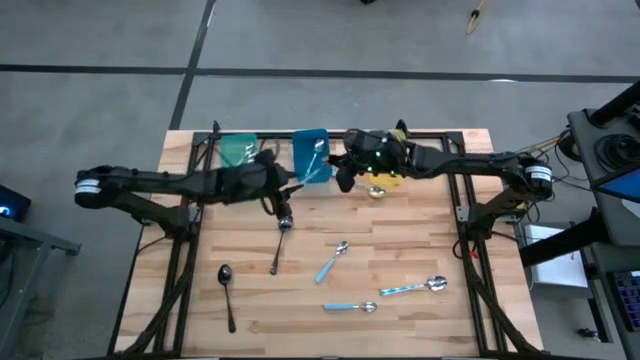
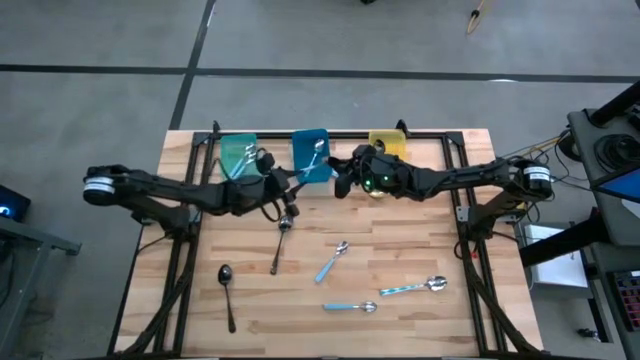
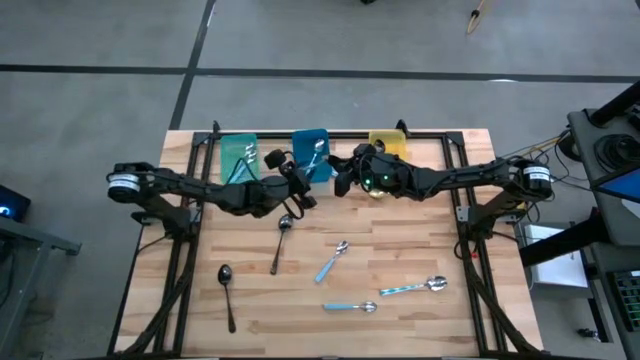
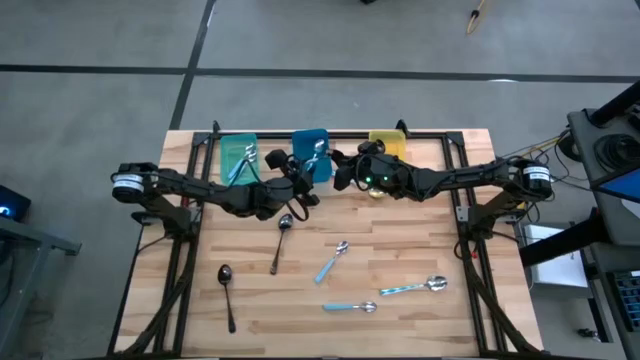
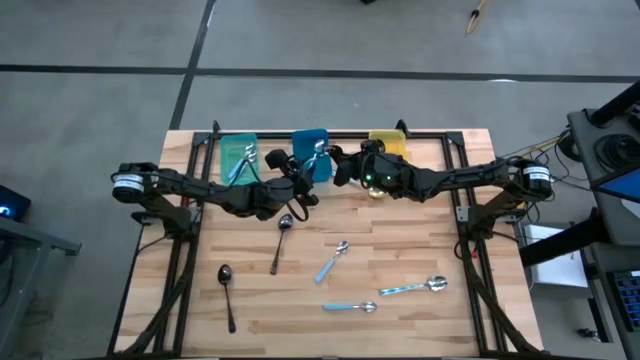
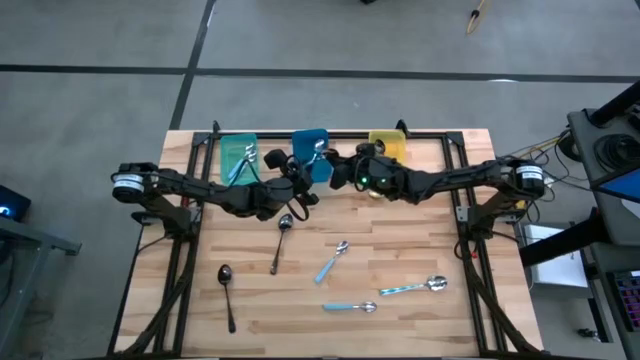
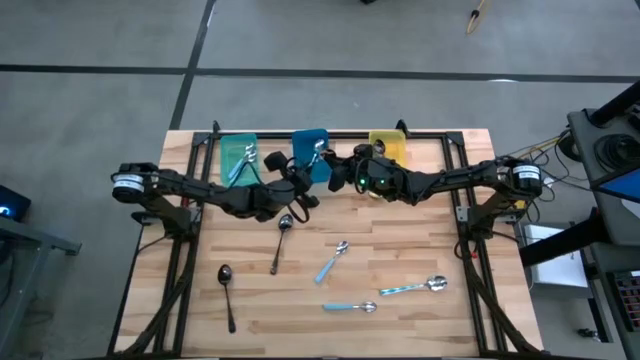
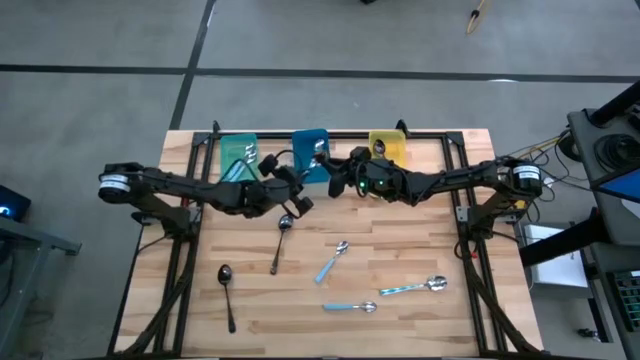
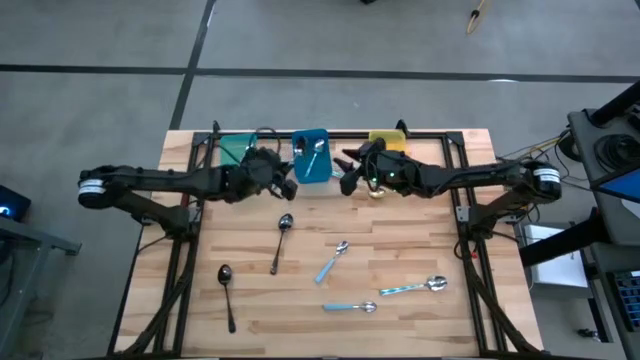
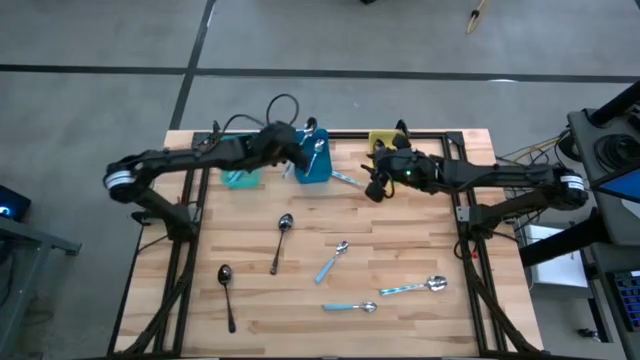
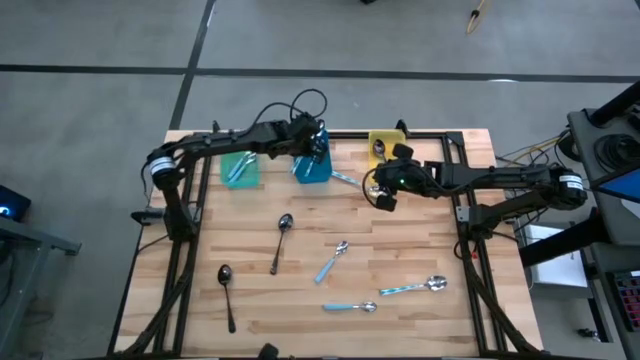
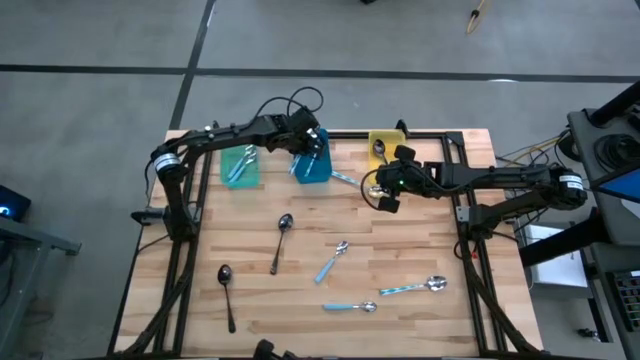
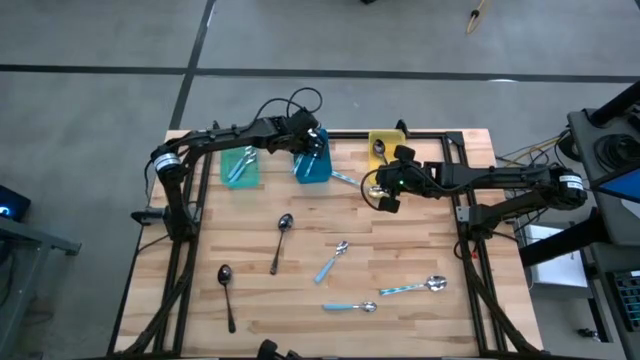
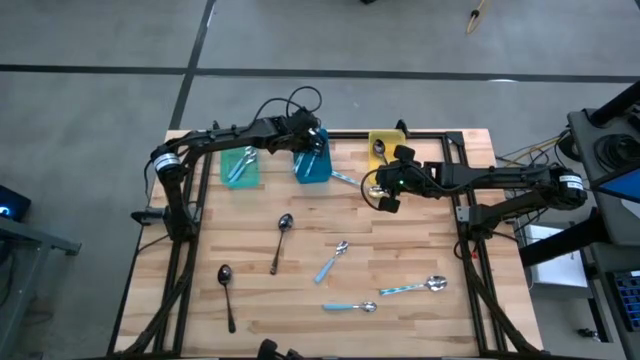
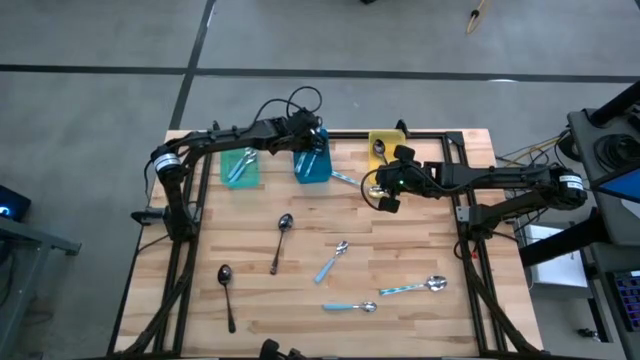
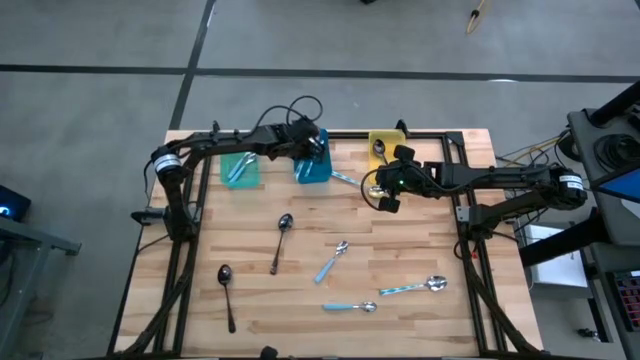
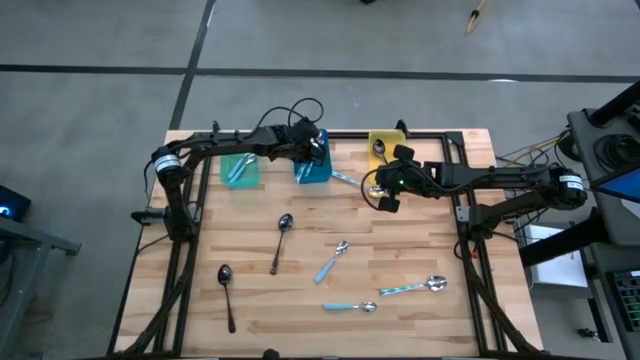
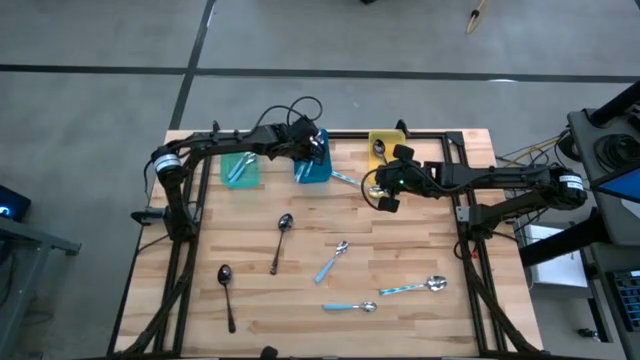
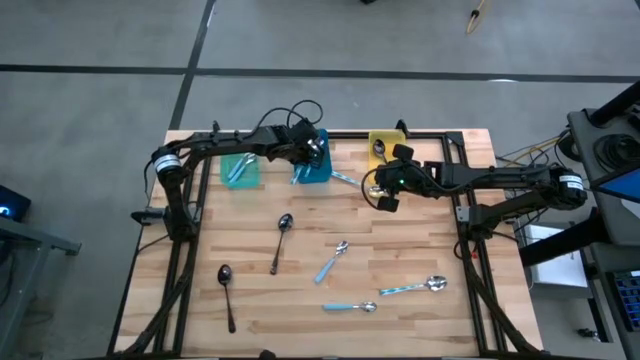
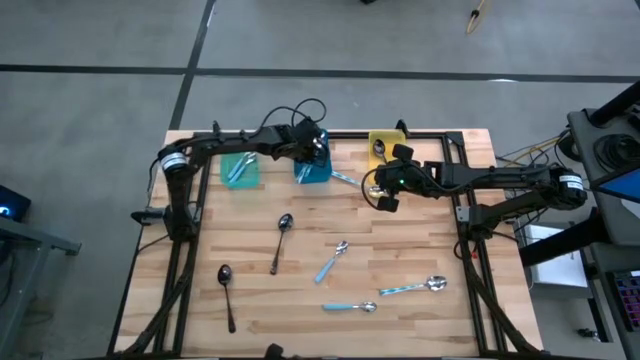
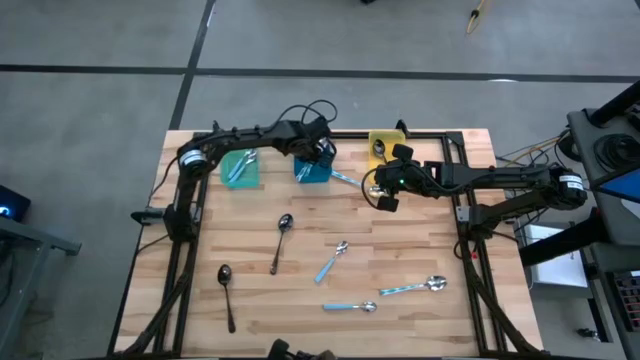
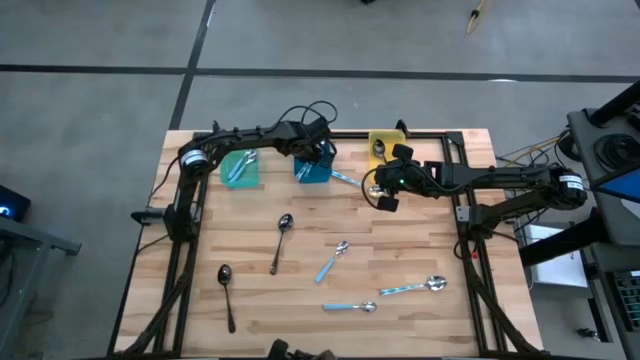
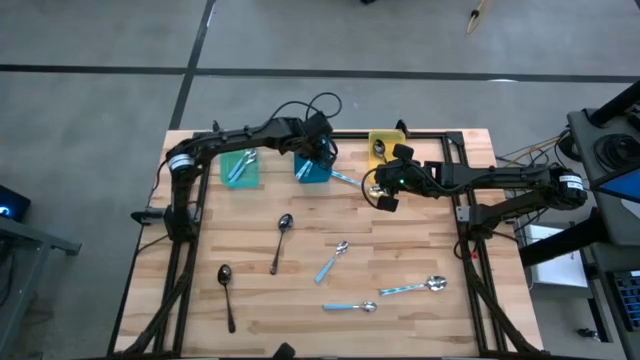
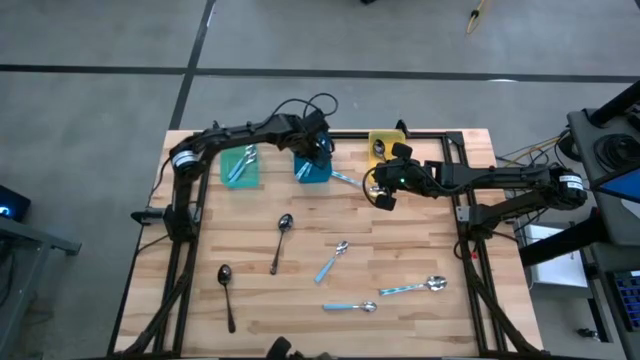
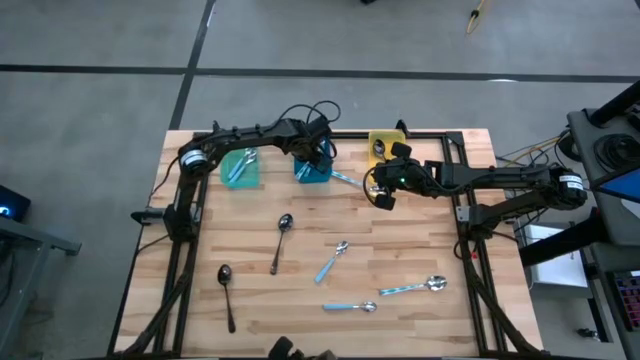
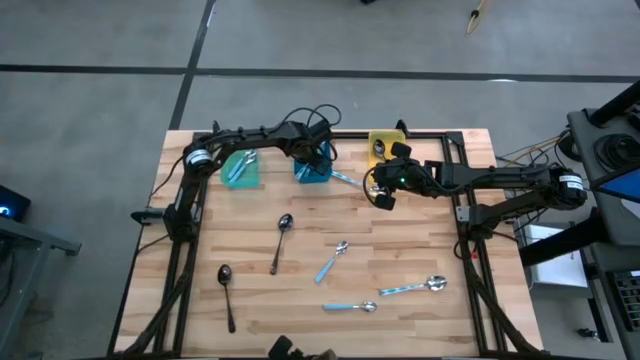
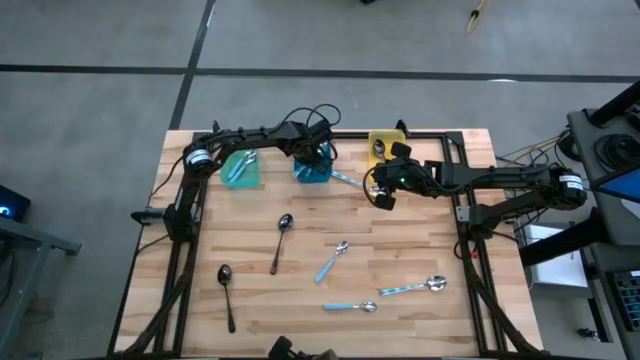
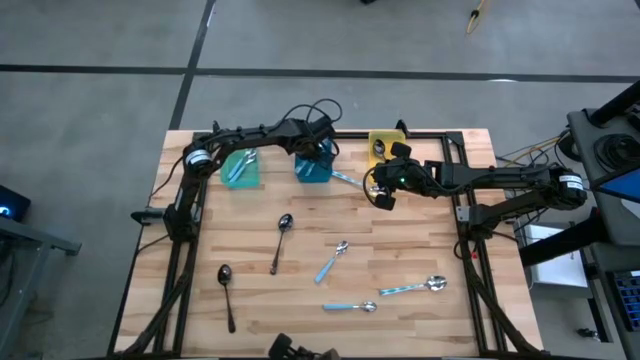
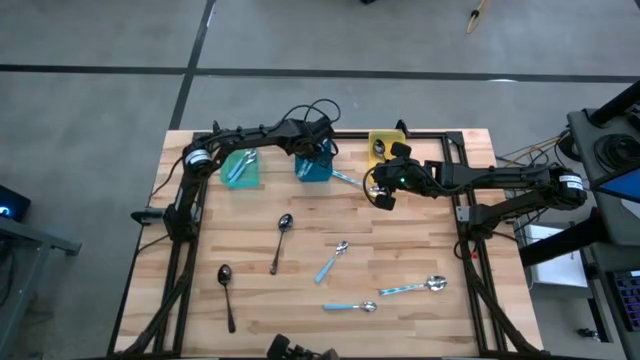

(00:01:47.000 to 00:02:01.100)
Task: Sort silverware by color (type)
Put the white-blue spoon into the blue bin

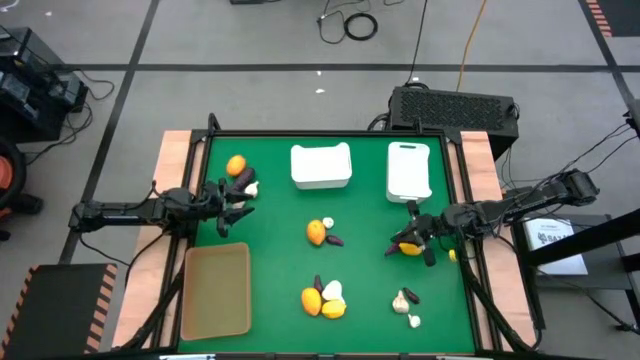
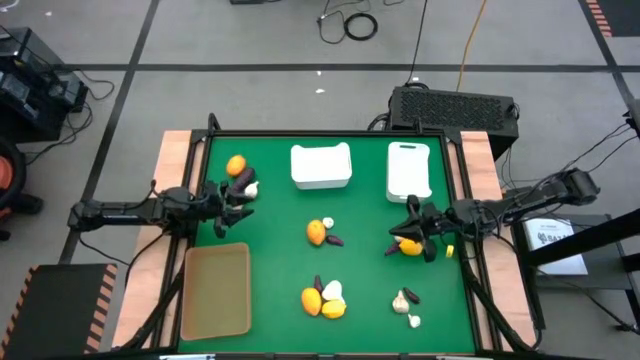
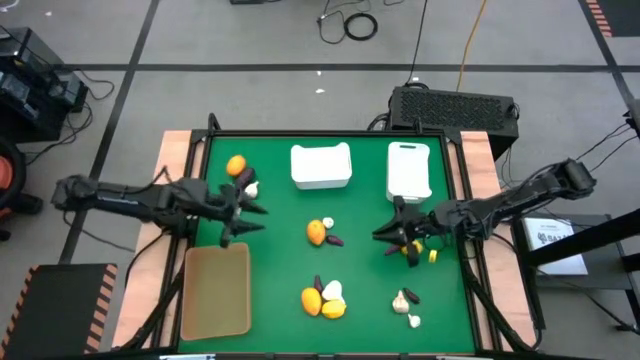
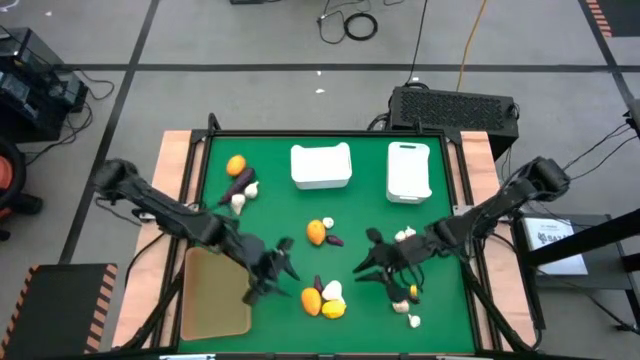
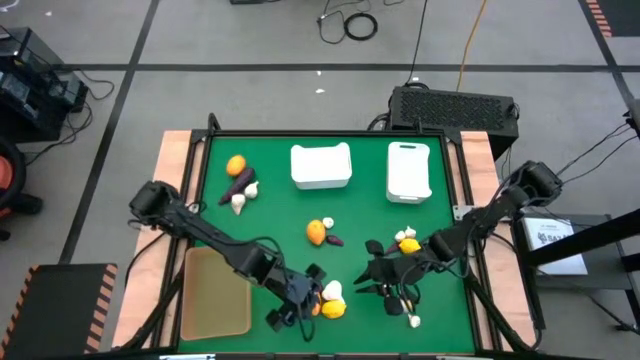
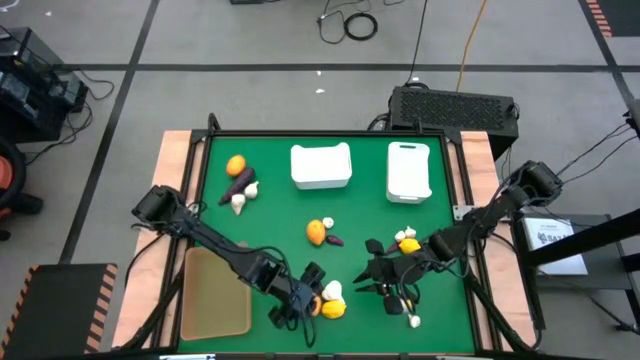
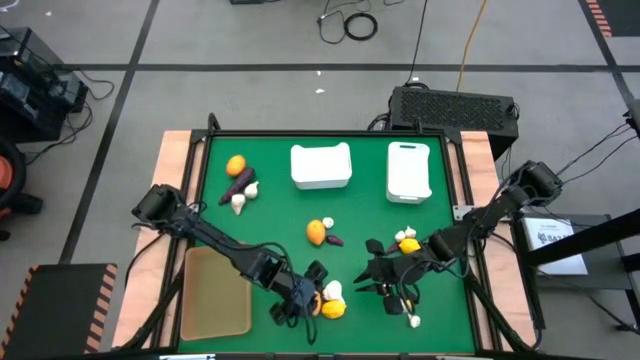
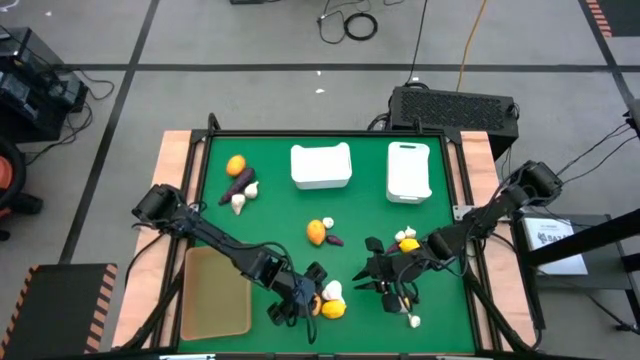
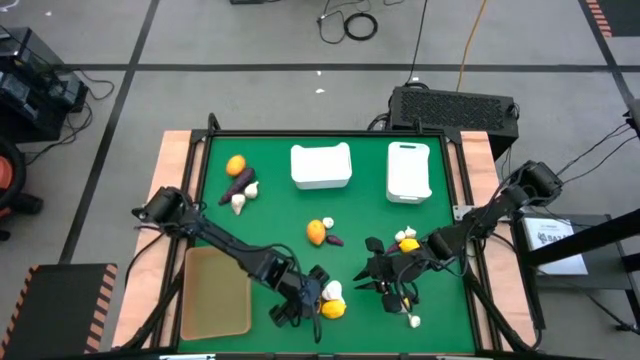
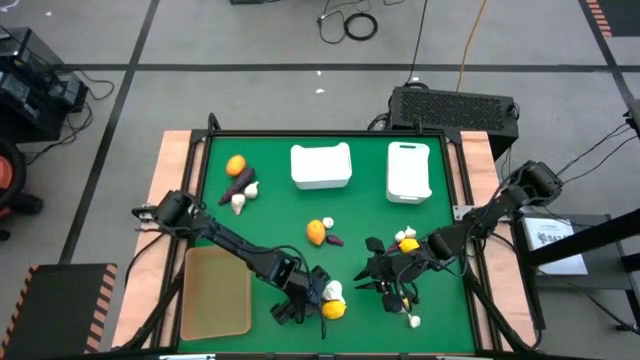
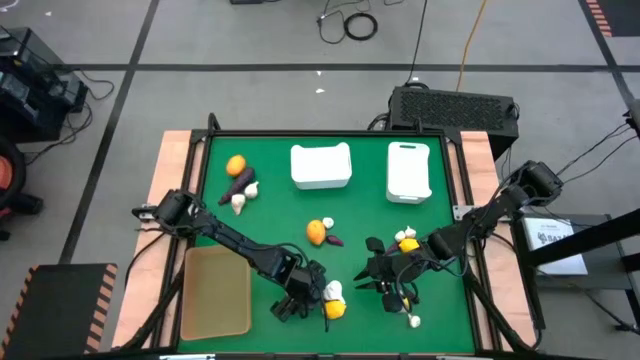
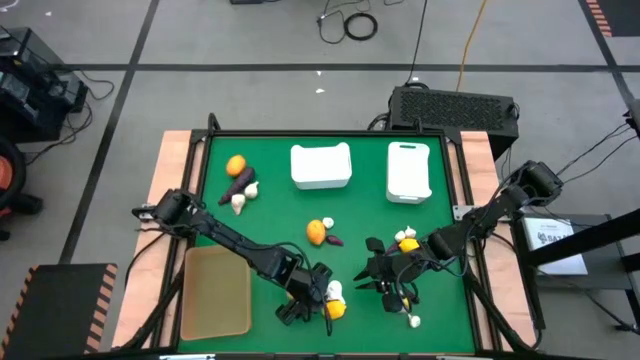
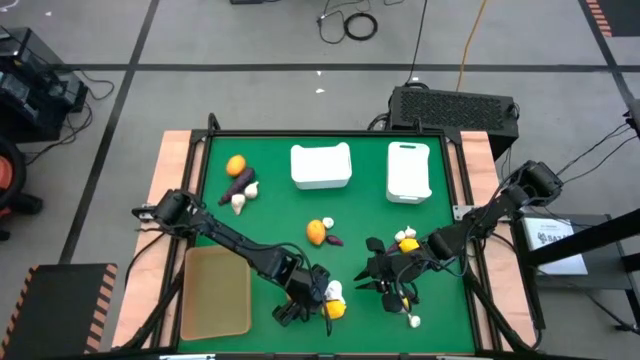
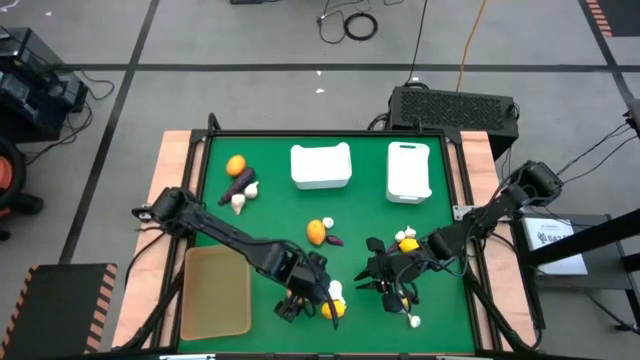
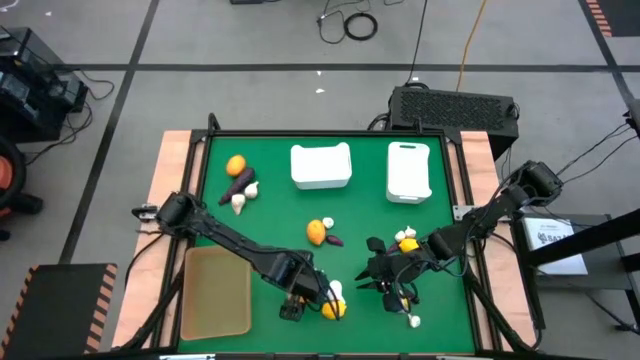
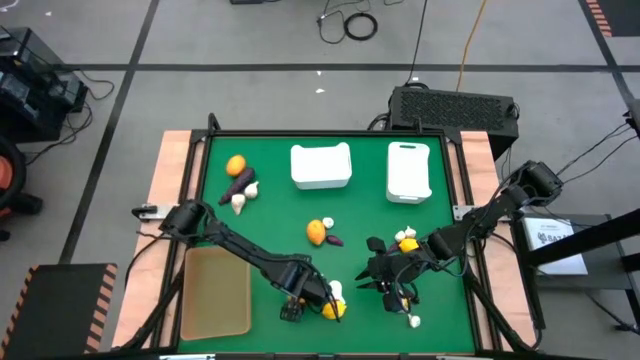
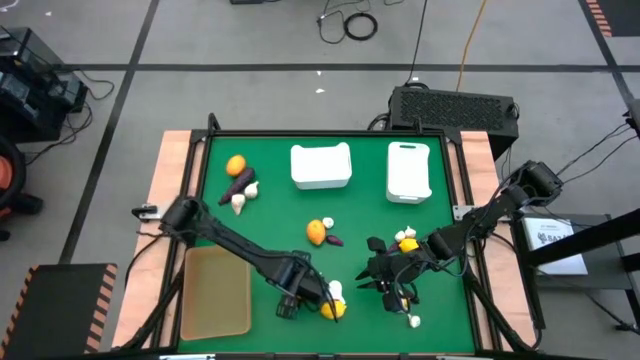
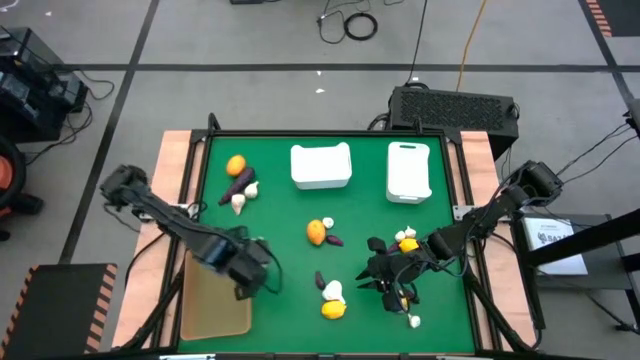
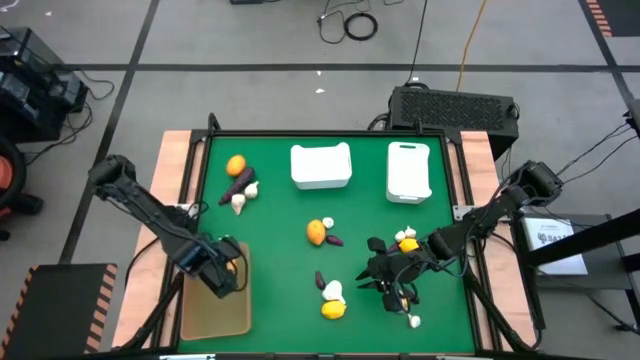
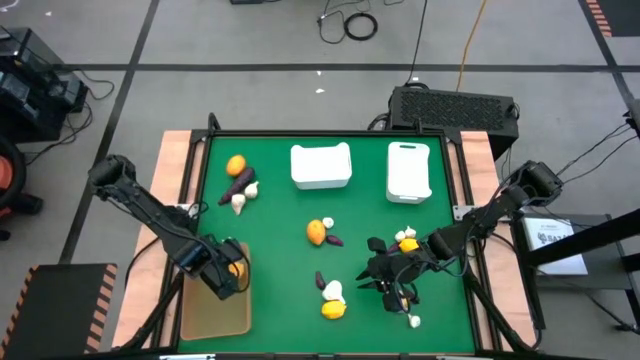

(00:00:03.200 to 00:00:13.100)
Task: Sort produce into baskets
Put the yellow lemon into the yellow bin
